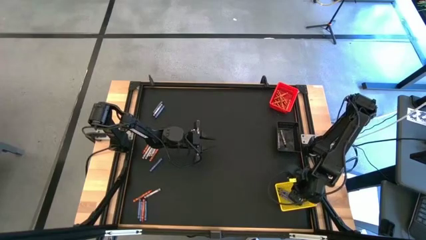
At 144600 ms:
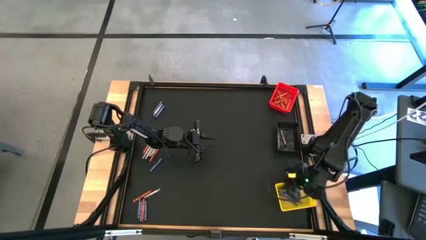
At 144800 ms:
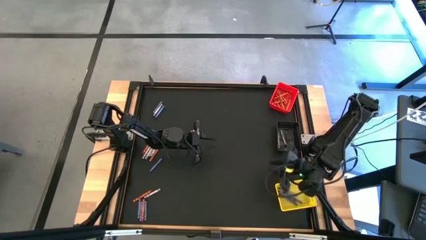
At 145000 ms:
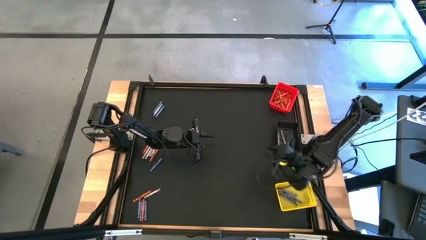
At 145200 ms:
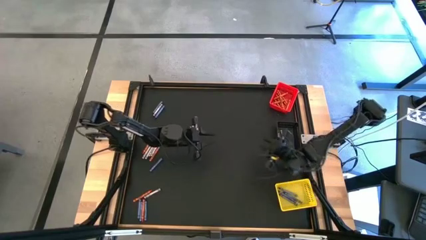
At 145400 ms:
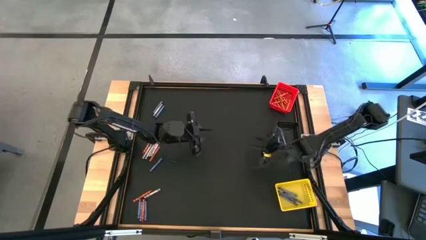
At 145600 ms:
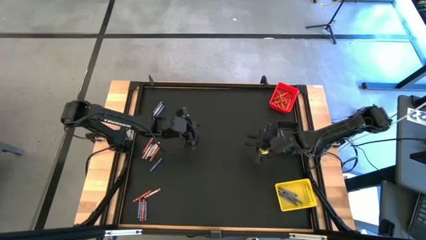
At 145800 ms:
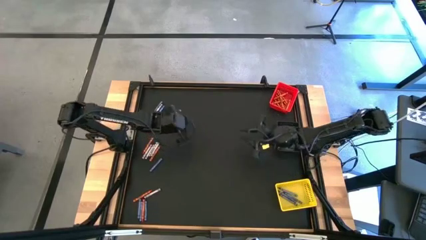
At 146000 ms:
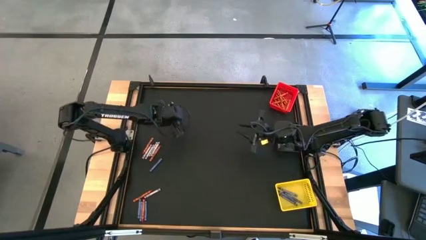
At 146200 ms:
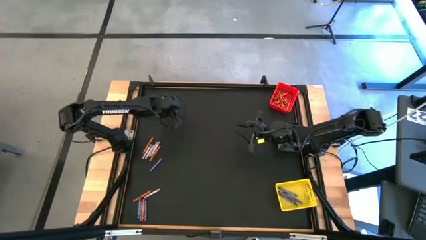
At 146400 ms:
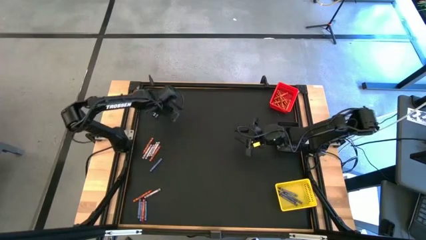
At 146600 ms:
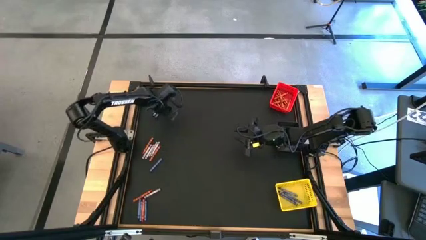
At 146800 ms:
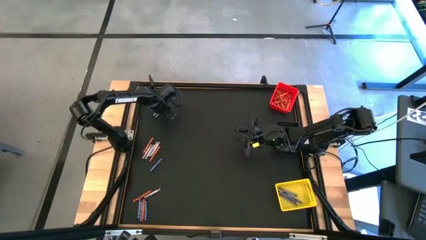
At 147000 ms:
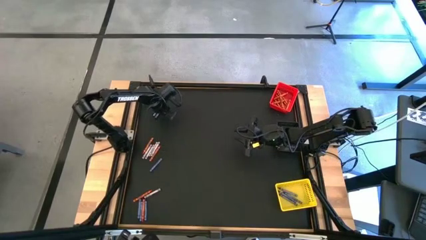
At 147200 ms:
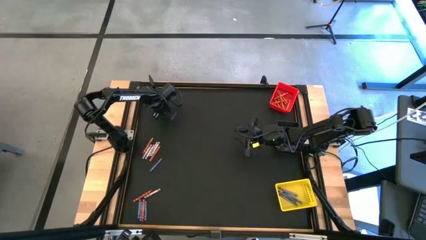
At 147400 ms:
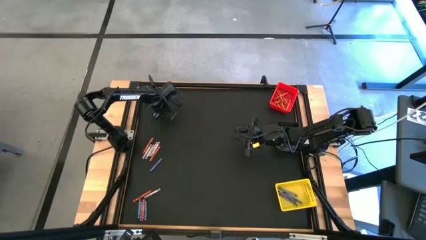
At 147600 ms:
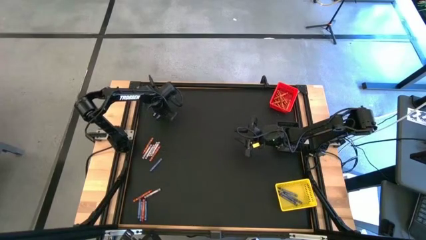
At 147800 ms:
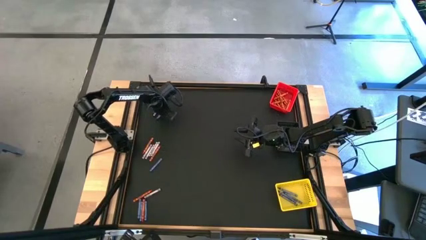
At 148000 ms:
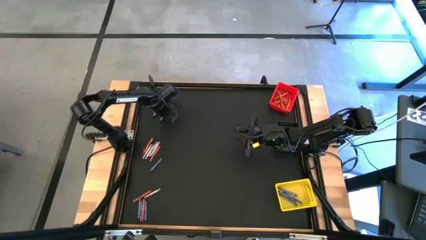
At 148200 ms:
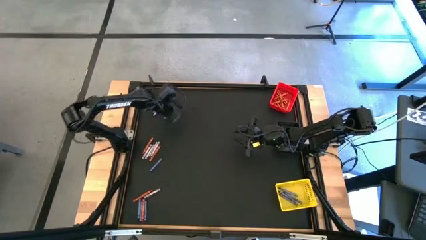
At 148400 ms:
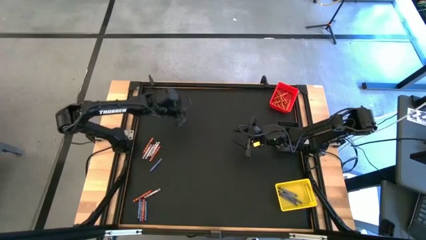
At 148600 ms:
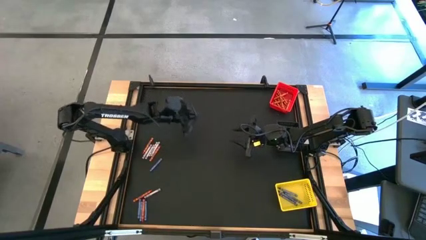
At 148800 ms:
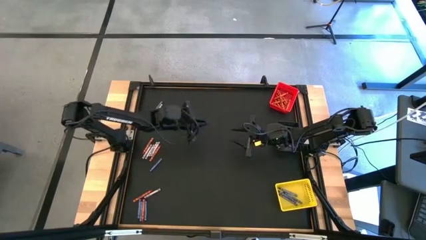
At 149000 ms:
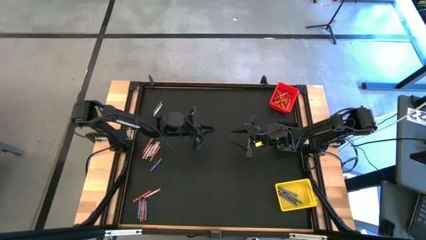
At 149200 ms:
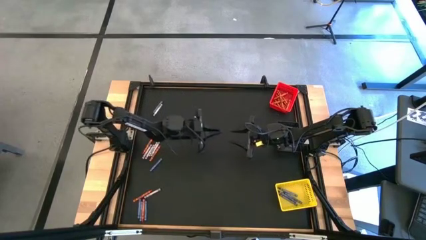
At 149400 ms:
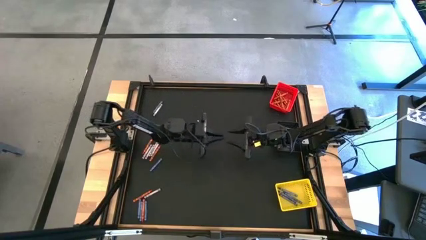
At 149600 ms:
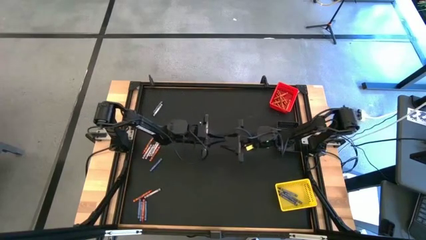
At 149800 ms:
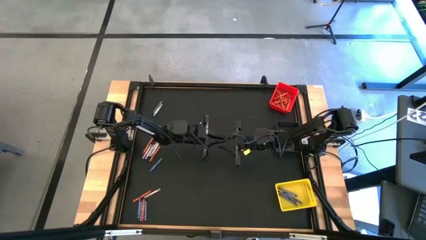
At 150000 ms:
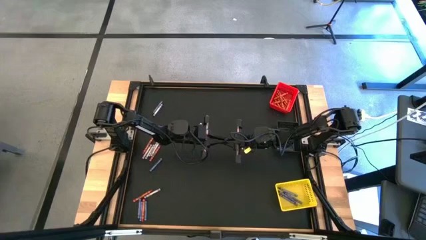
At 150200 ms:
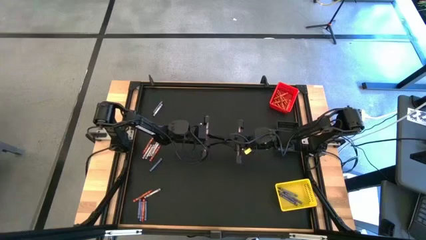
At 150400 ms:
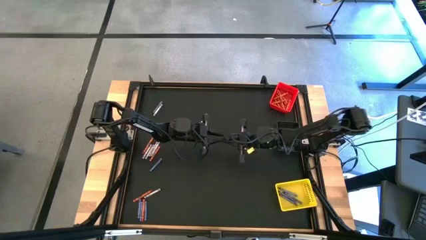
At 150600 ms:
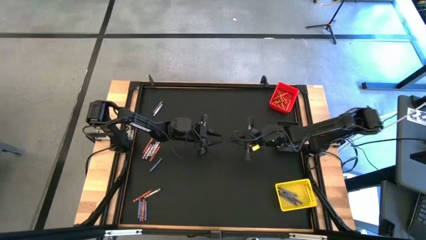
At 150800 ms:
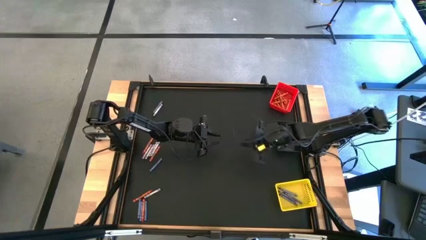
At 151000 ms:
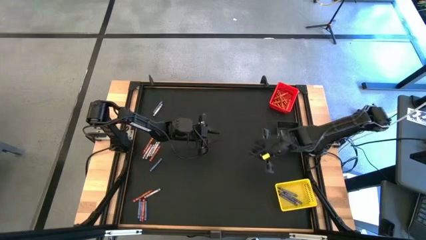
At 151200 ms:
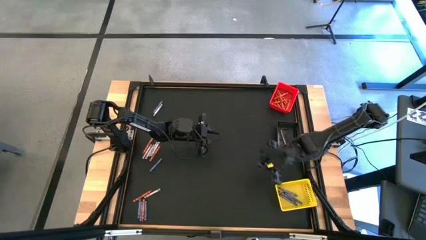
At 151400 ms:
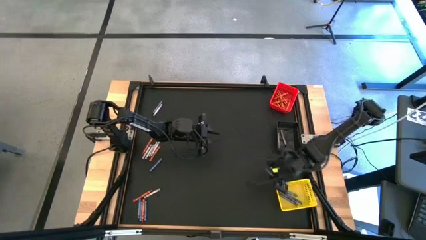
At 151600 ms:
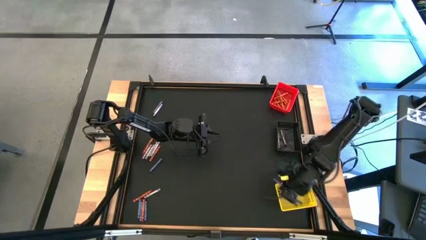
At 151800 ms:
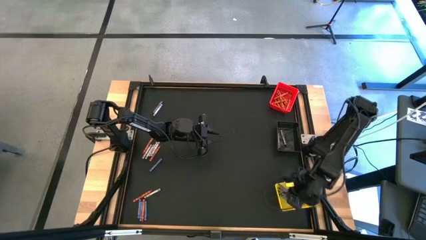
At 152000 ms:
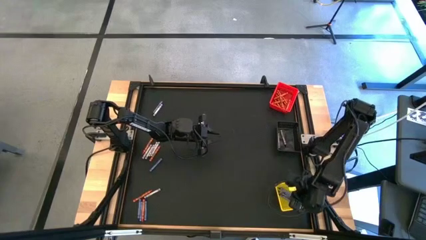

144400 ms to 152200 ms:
Task: Sort crayons
Put the blue crayon into the yellow bin

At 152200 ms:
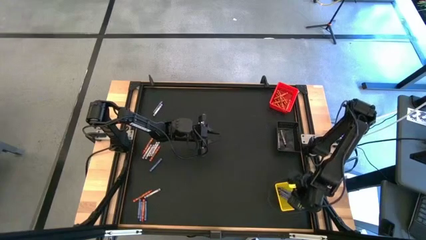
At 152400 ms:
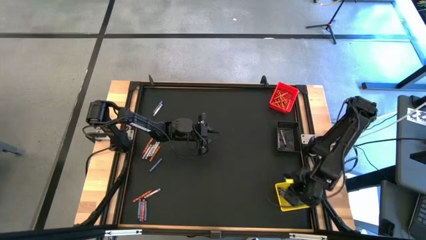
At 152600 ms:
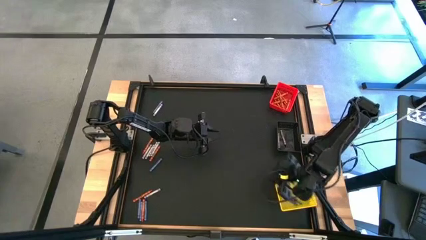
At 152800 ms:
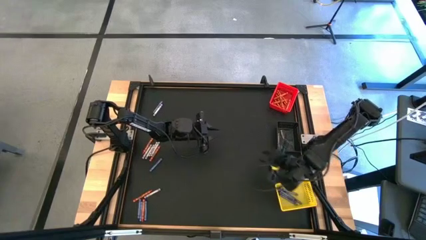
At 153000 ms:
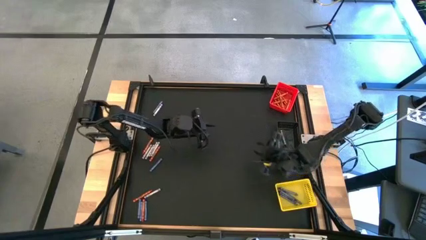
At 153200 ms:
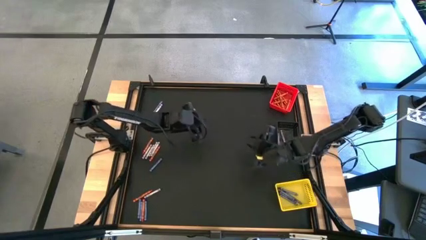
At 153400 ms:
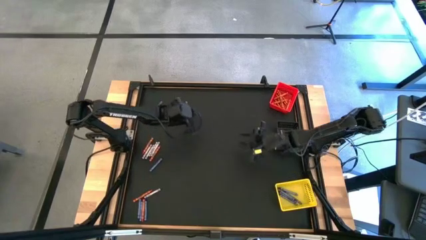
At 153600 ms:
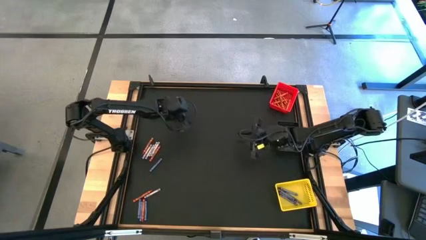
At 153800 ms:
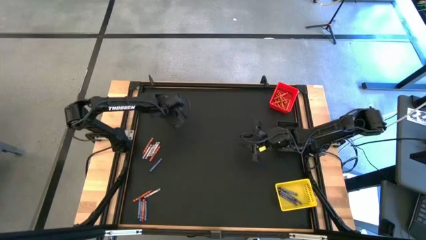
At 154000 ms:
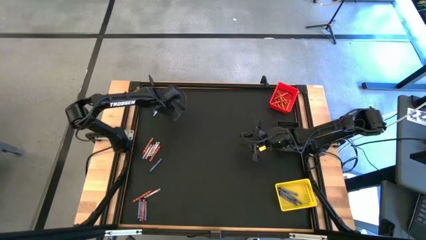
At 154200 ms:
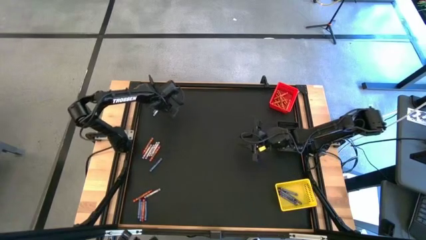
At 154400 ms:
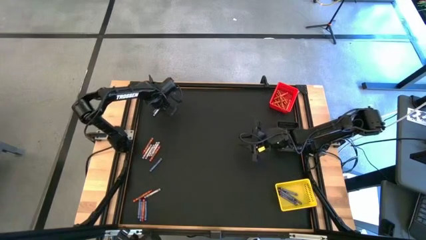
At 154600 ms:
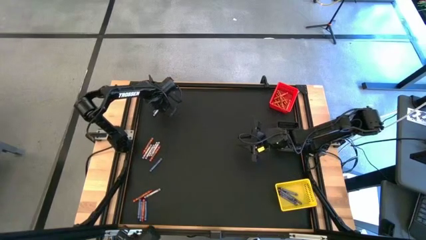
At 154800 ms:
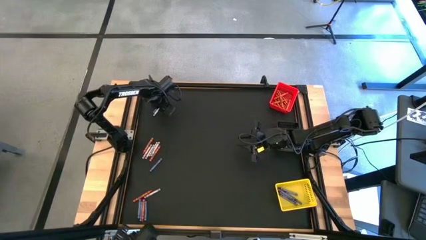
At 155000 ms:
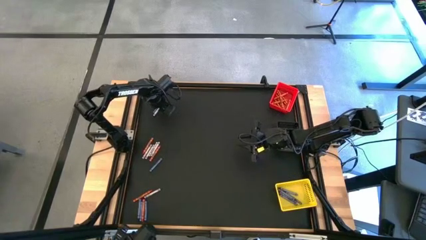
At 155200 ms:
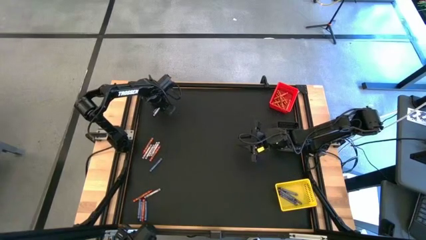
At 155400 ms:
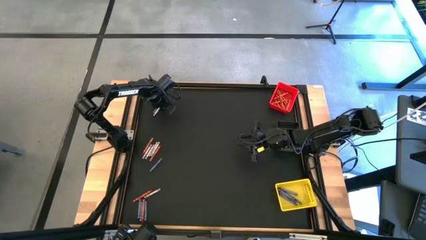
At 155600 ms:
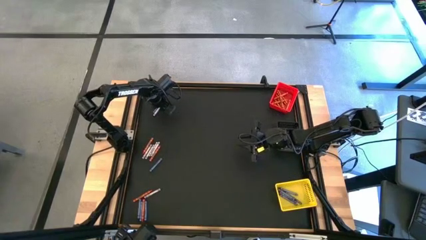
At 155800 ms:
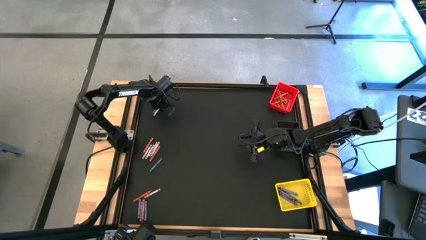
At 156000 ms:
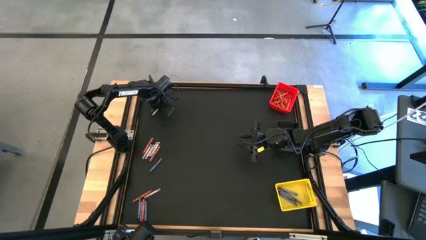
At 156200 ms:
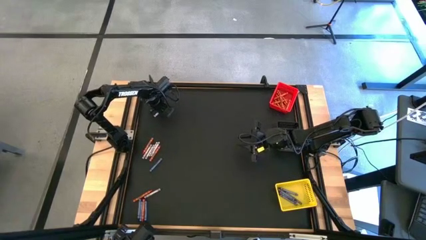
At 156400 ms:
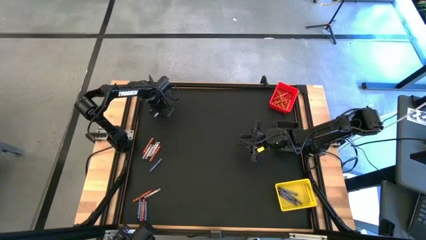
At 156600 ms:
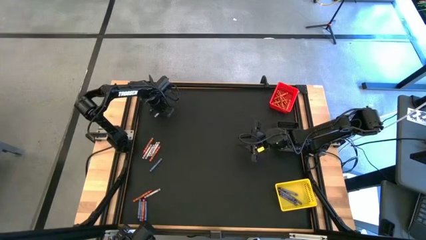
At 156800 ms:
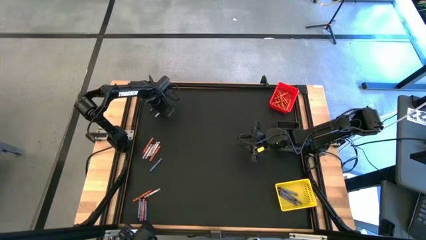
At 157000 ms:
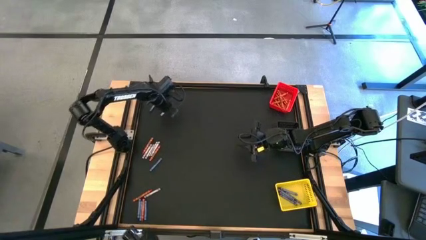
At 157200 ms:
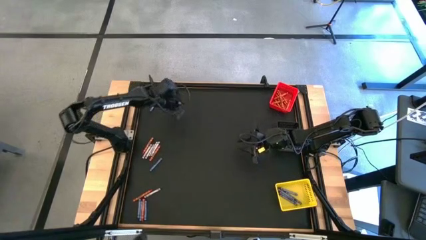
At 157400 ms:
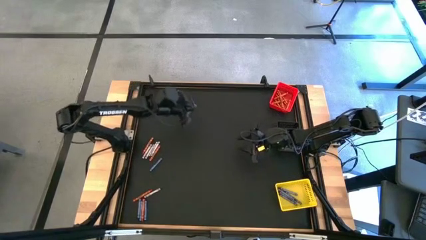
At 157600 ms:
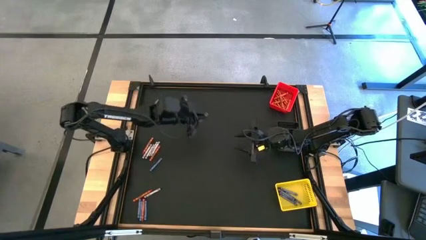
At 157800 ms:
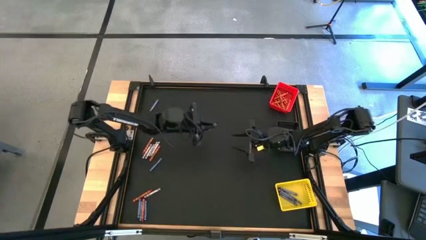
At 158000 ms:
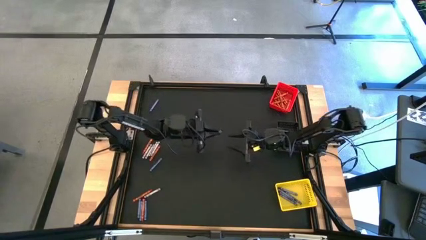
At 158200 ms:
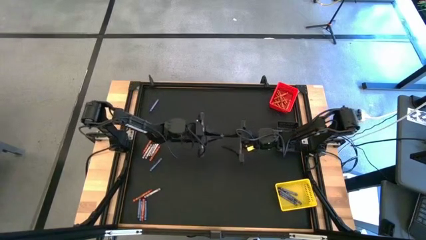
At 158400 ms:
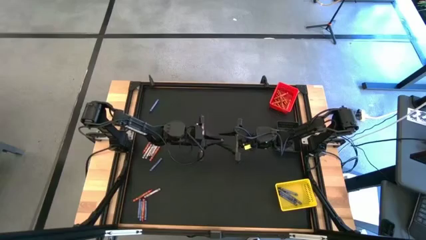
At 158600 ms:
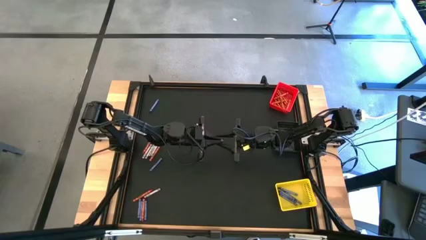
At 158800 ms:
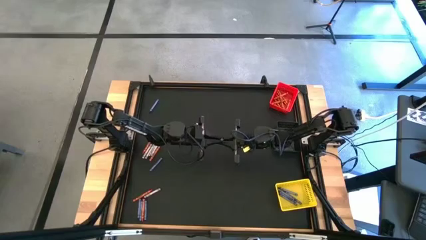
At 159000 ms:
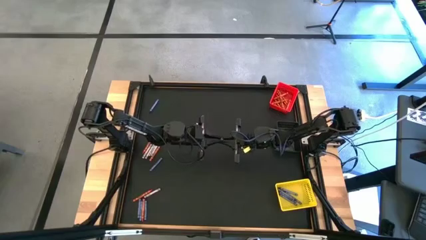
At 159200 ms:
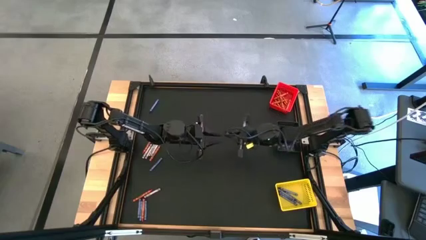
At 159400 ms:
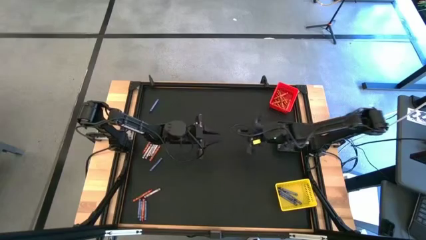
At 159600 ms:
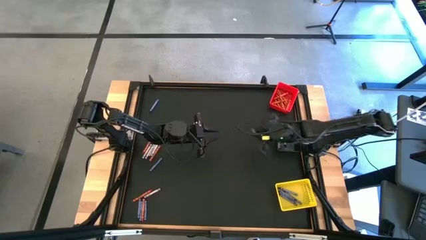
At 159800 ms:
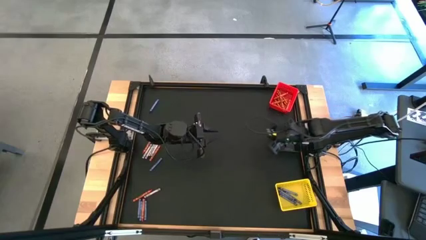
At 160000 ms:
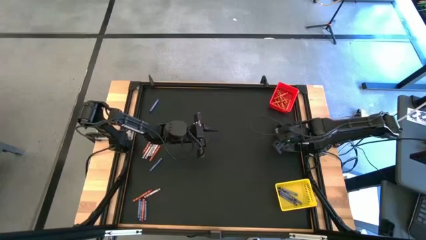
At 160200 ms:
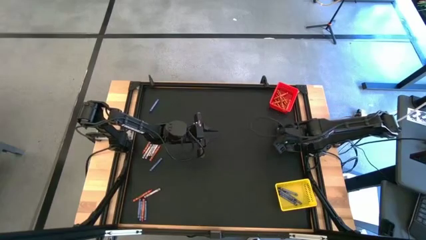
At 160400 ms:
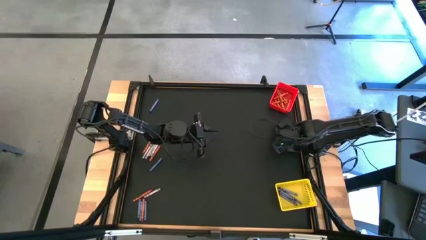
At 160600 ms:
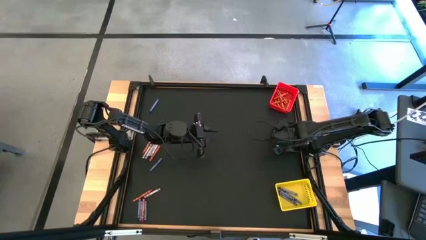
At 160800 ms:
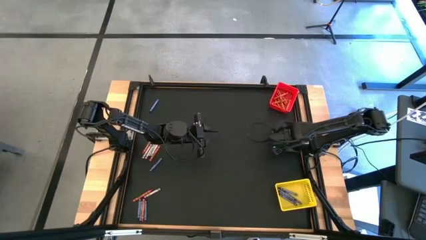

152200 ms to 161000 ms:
Put the black crayon into the black bin
